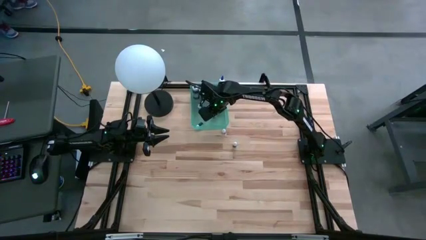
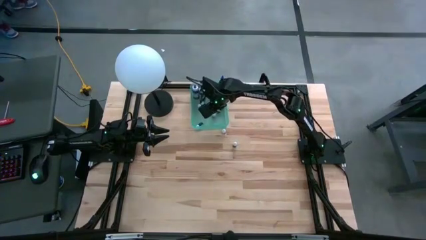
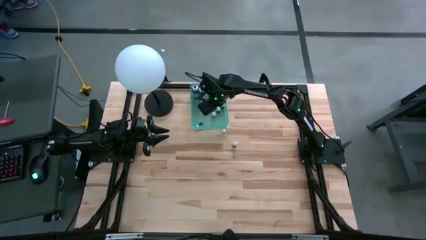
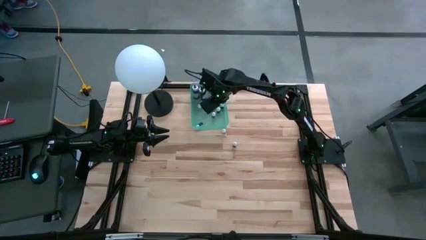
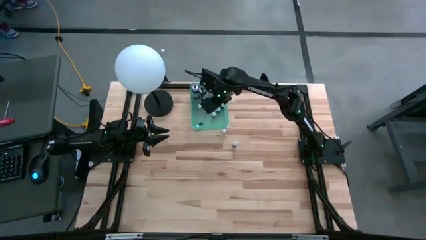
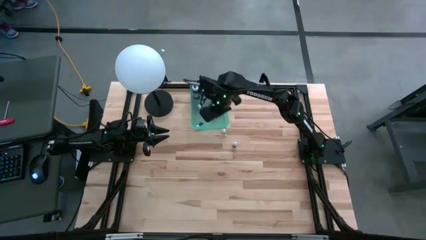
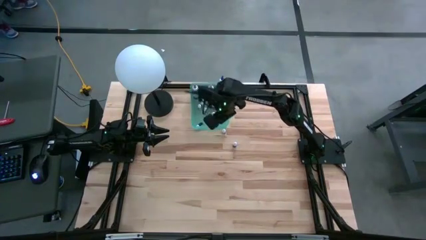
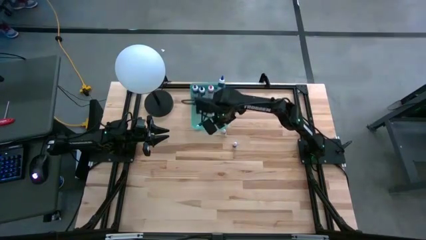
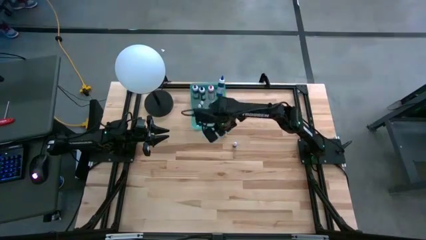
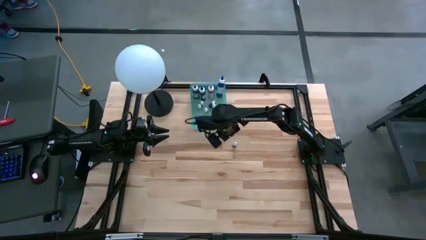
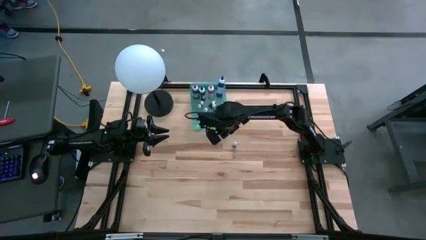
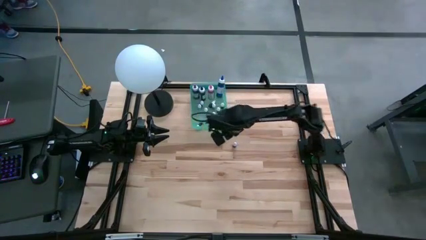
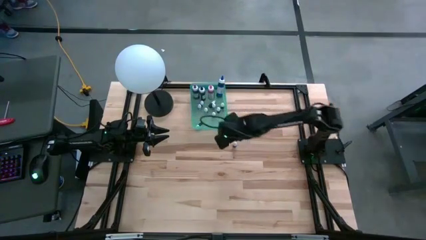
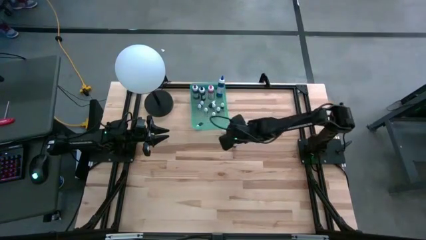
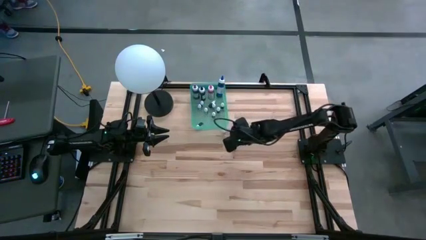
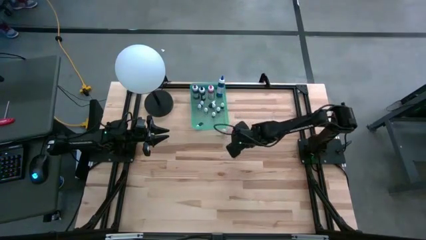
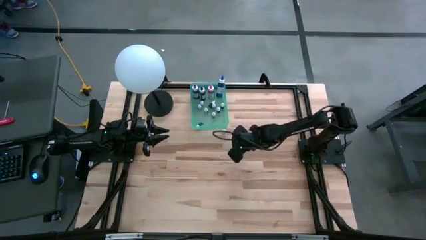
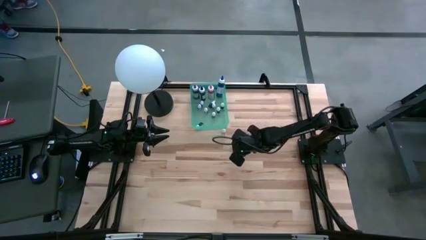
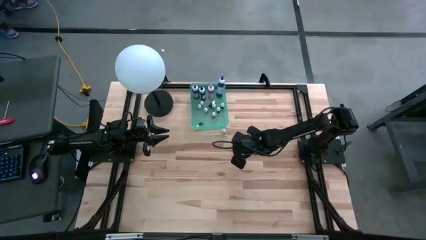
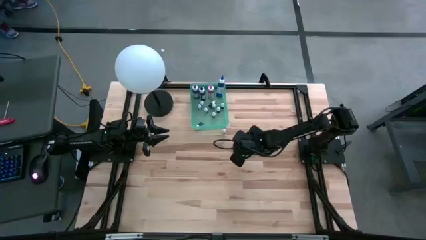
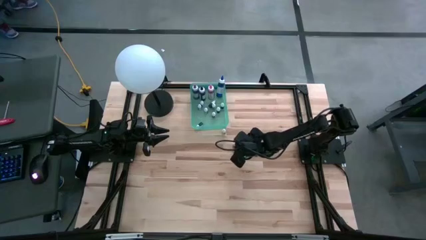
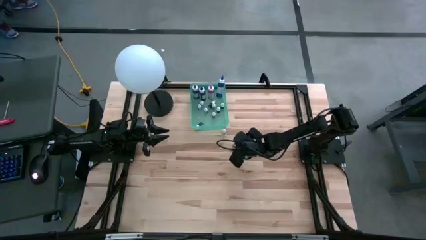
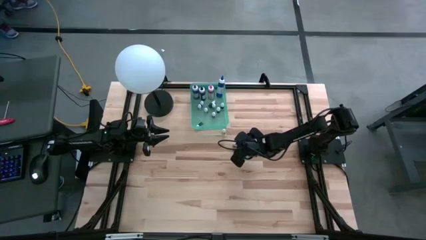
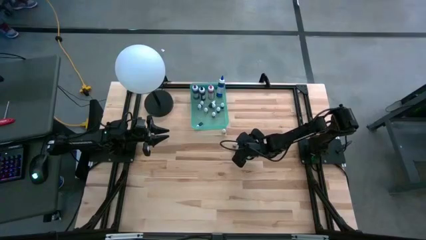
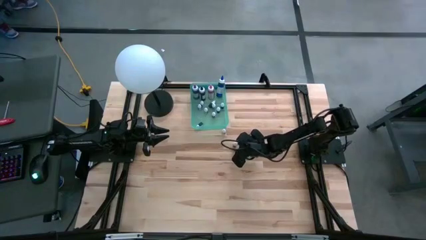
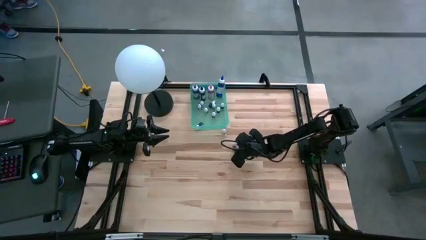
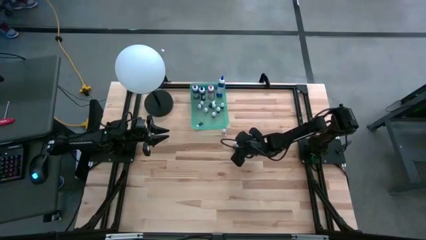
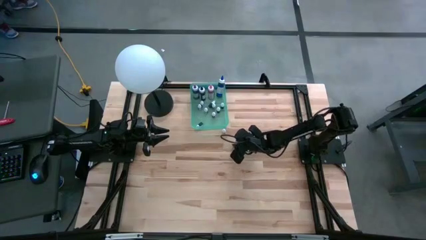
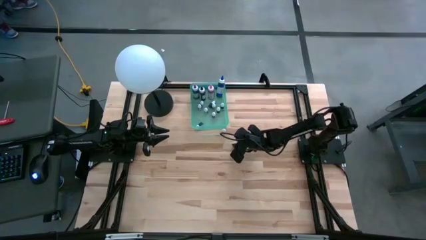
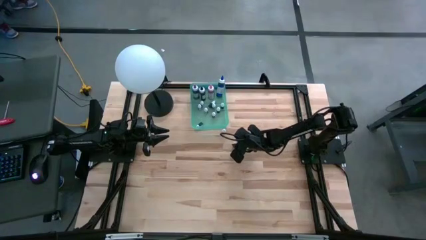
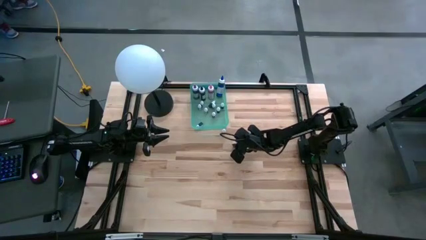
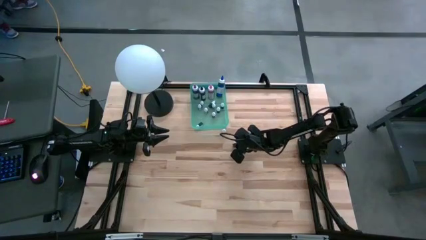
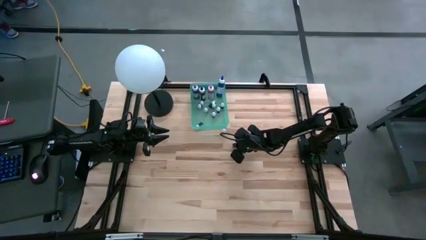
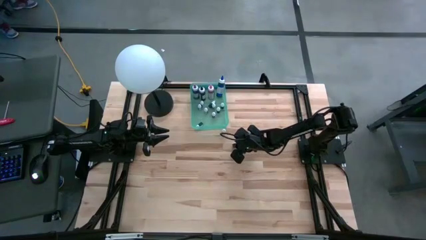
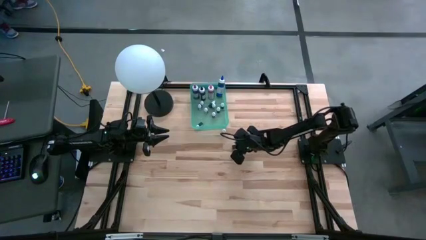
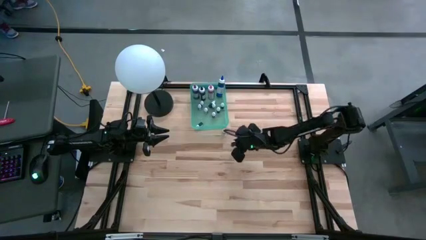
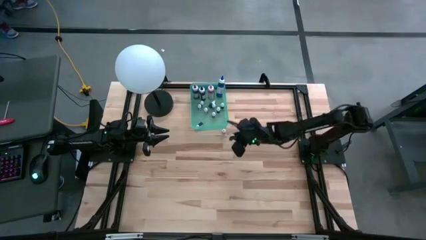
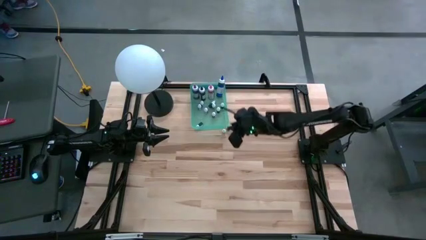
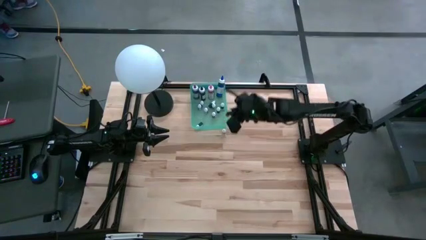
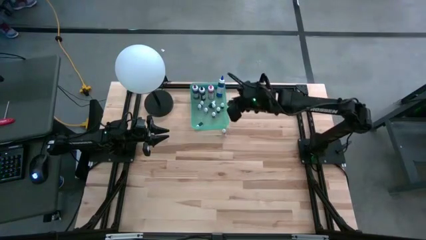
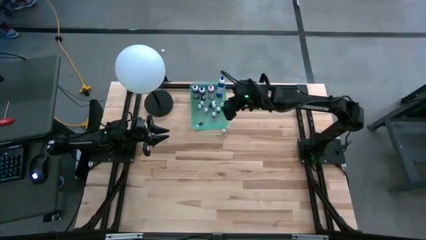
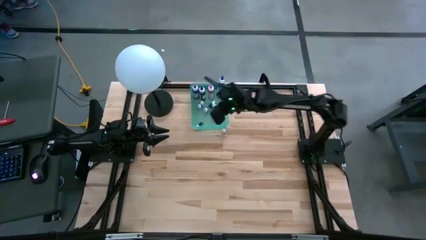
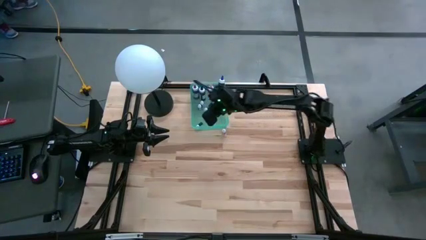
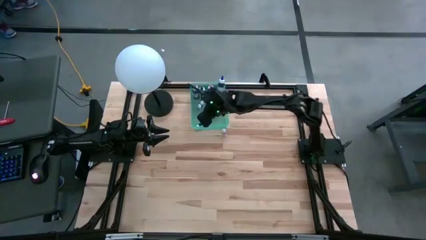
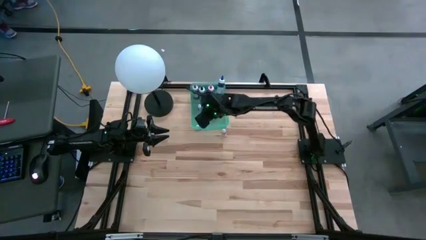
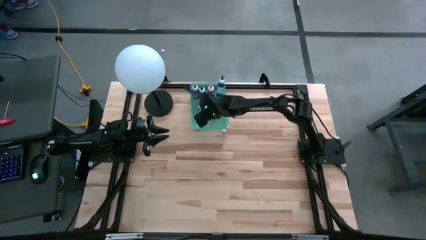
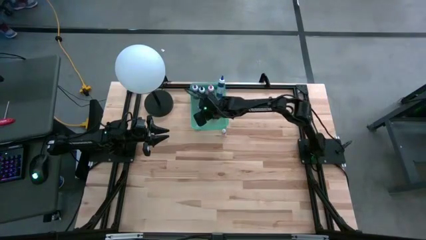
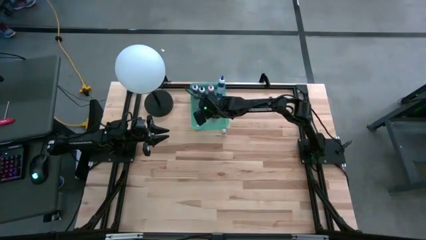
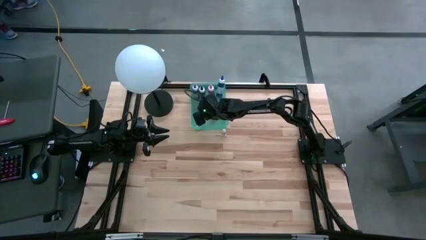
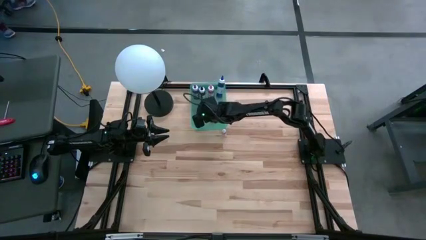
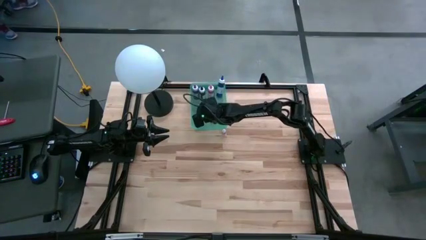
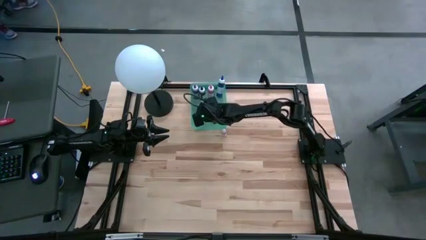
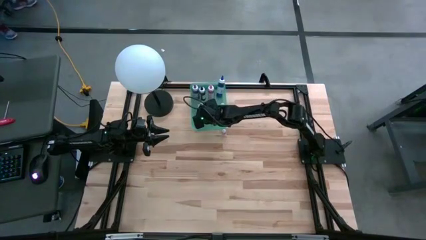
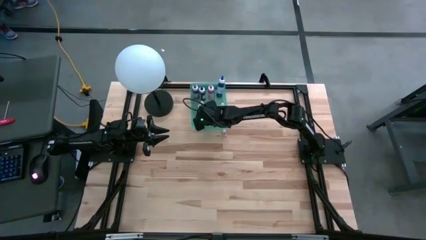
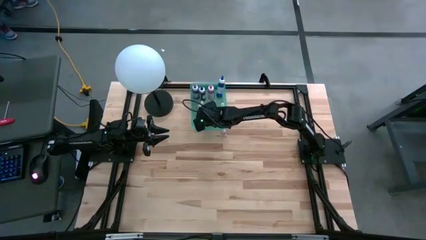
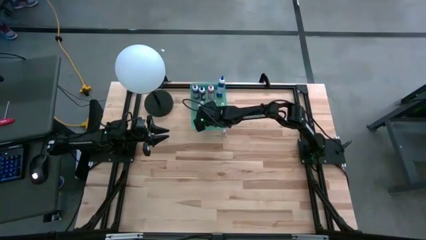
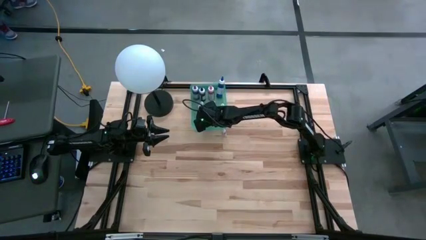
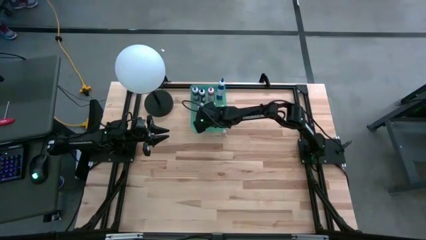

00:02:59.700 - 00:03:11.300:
Task: Pick & Place food coloring
Put the small blue food coloring bottle into the blue bin

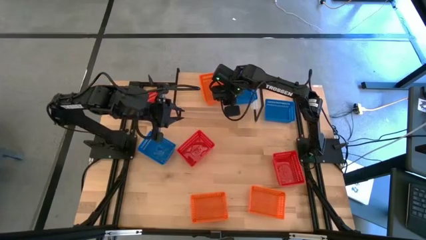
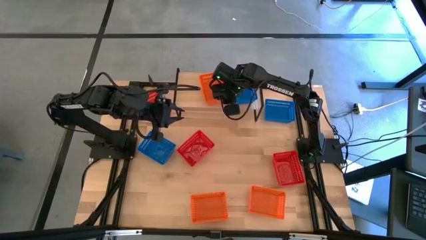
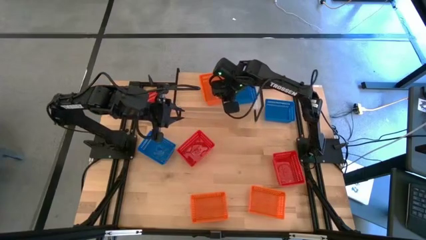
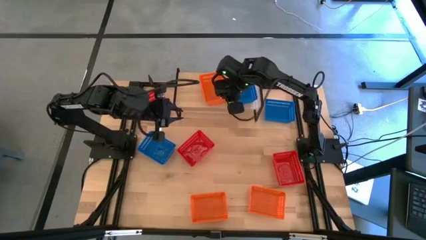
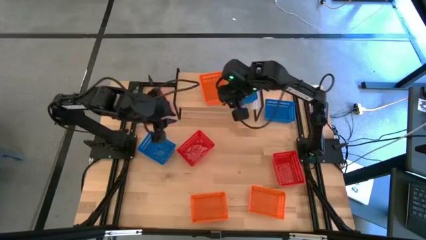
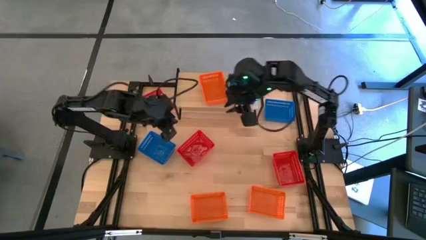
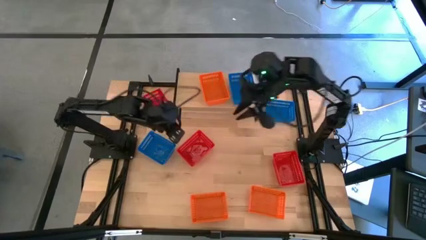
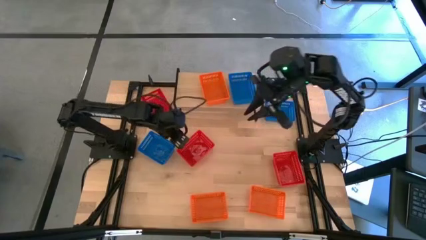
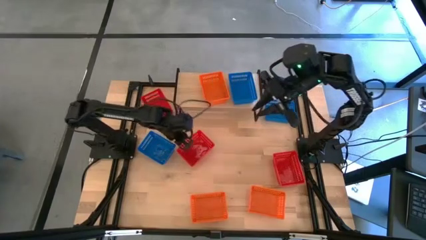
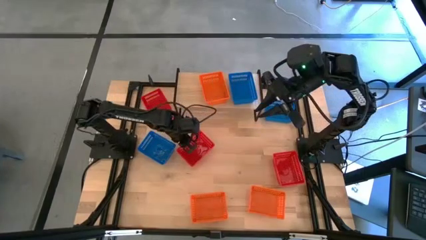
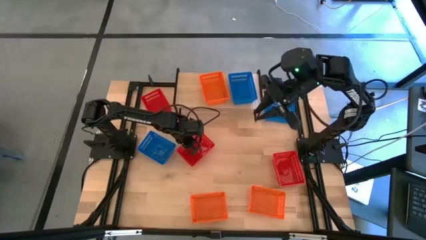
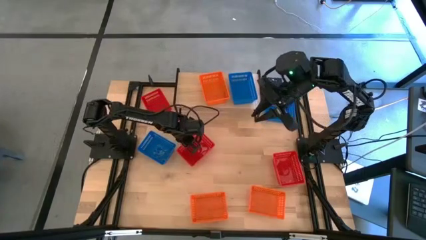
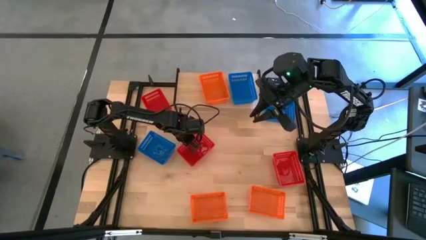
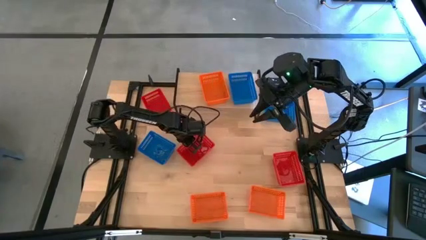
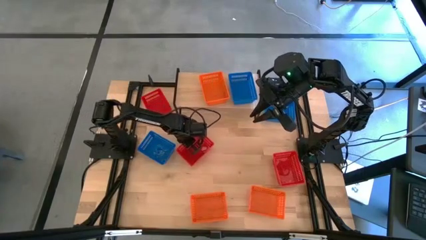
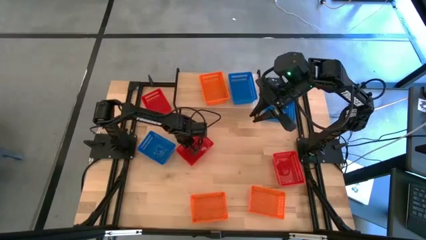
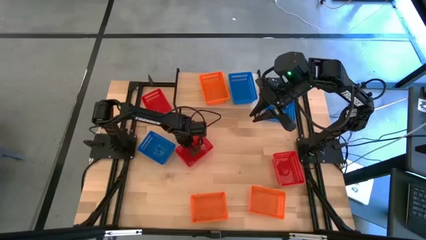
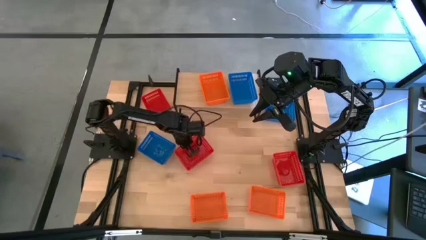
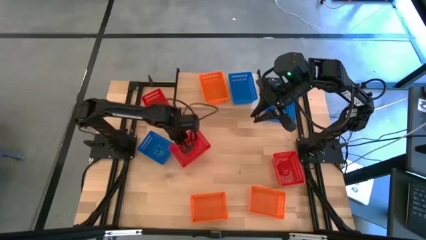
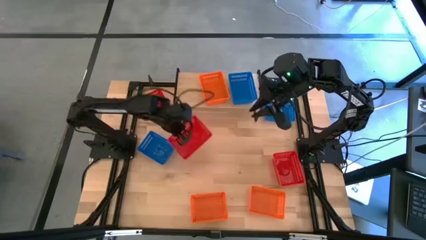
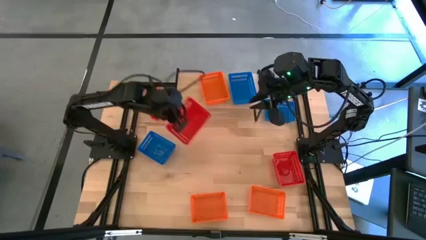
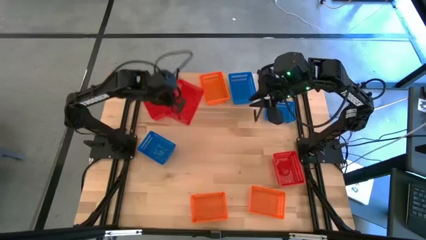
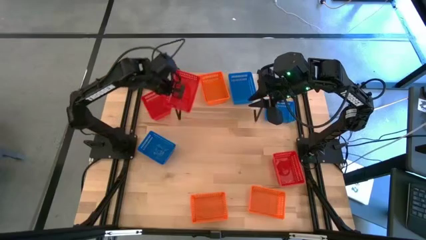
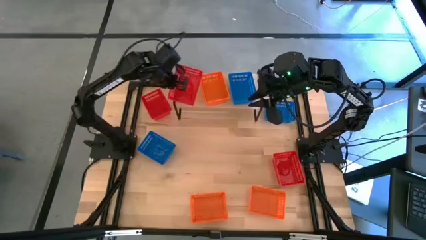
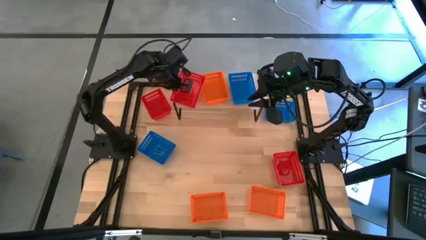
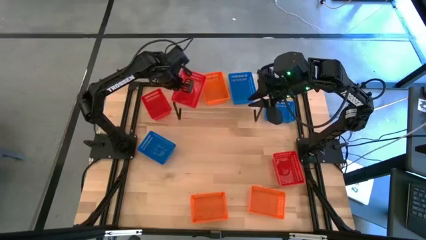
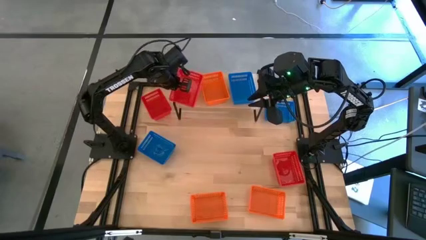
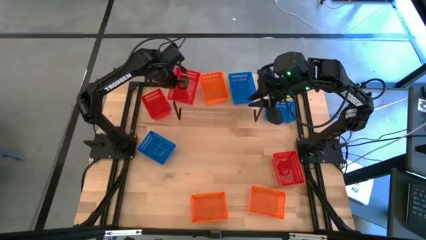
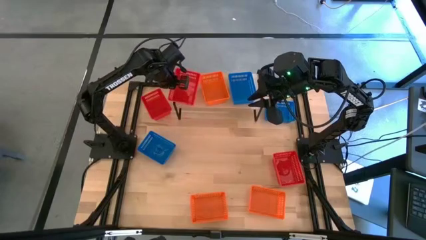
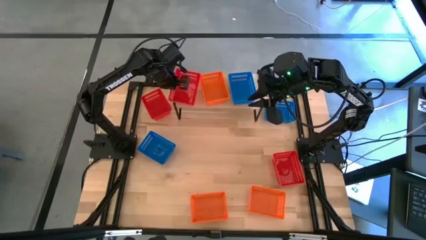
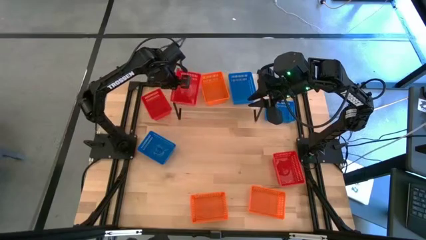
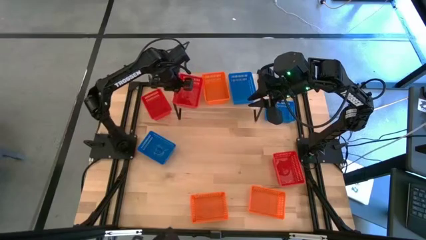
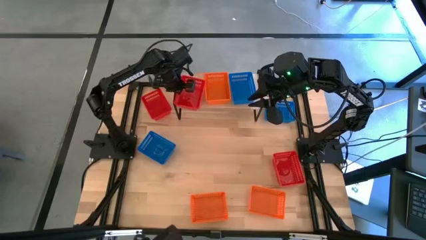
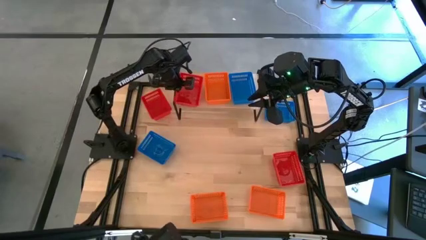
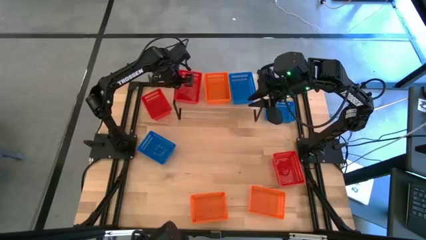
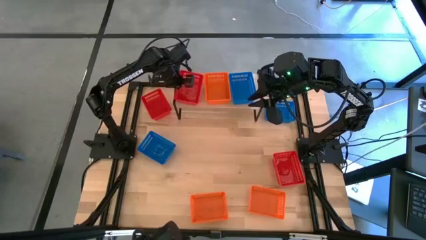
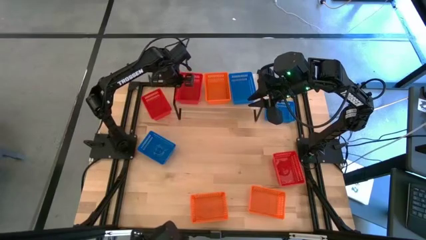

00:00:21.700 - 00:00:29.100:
Task: Stack baskets on shelf by color
Put the middle red basket on the shelf
